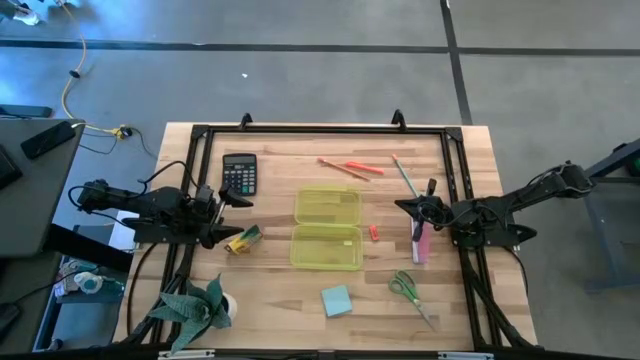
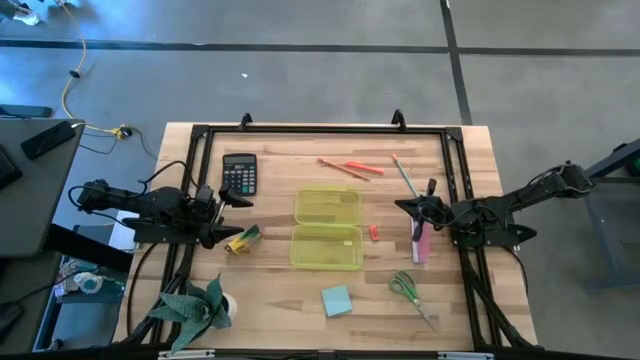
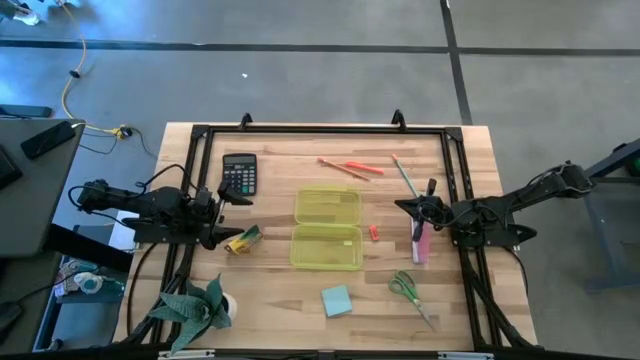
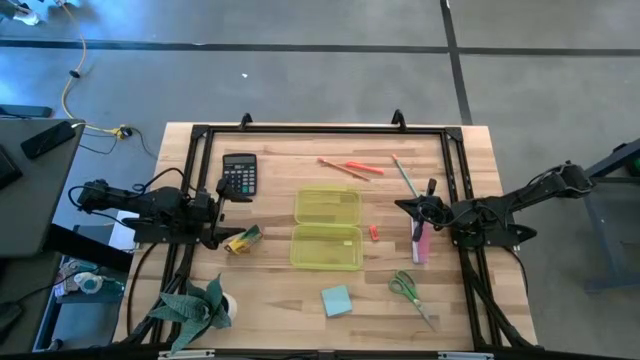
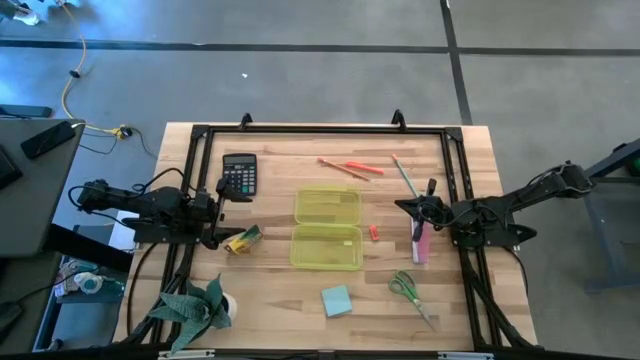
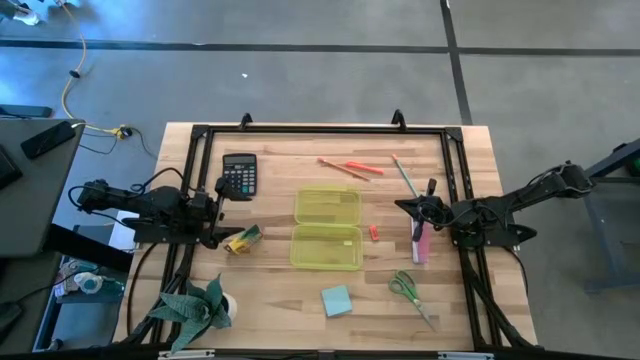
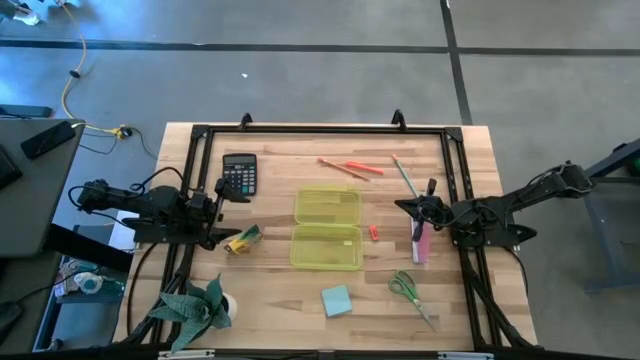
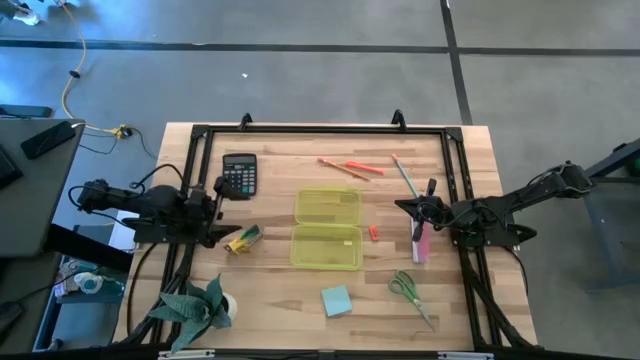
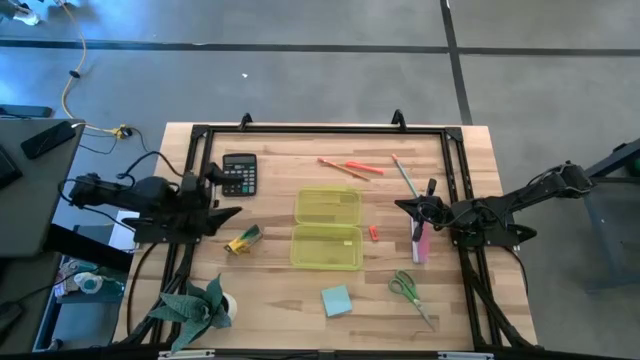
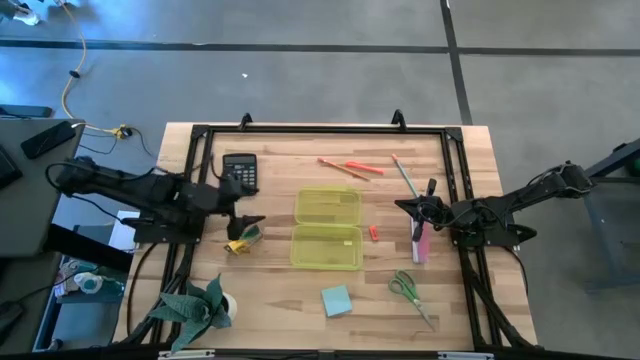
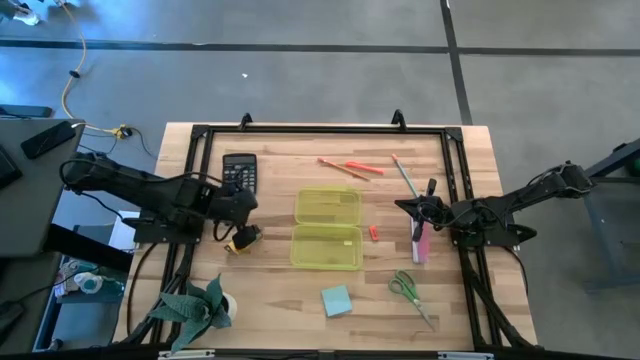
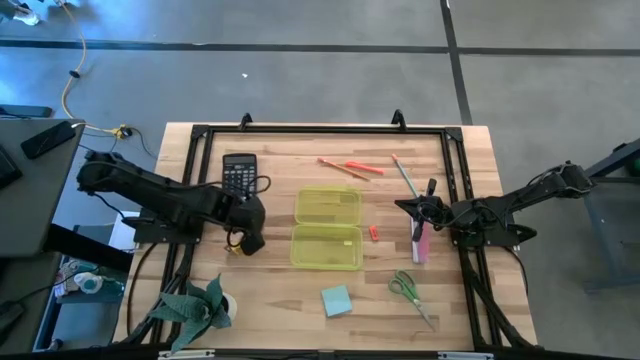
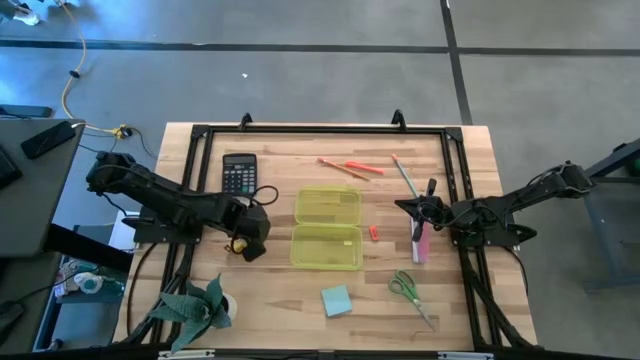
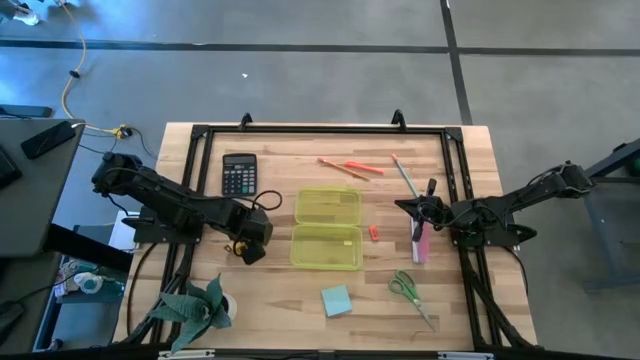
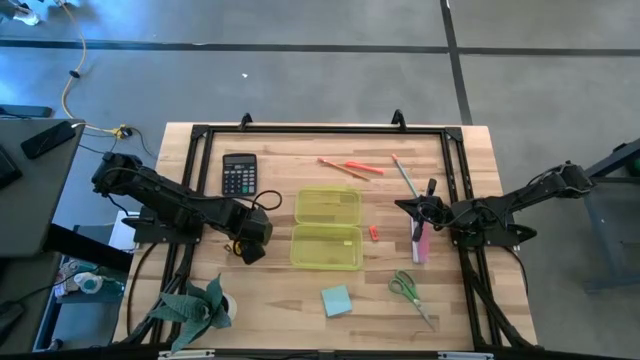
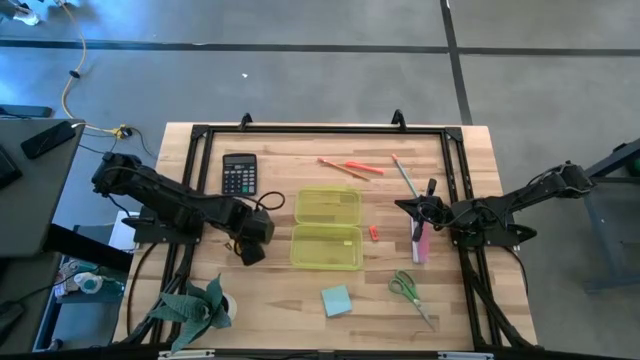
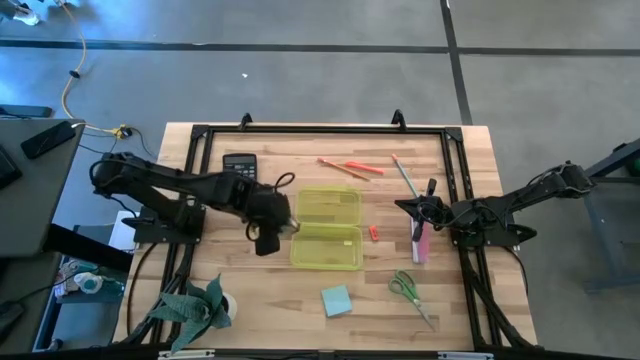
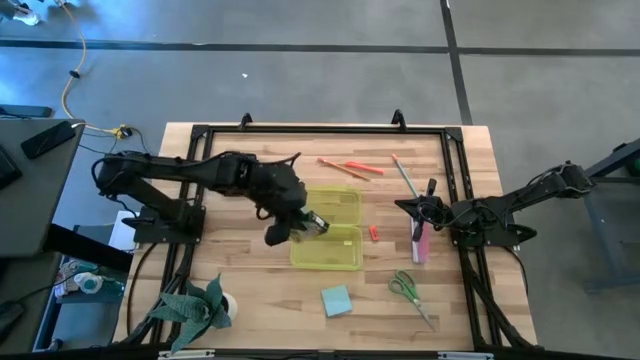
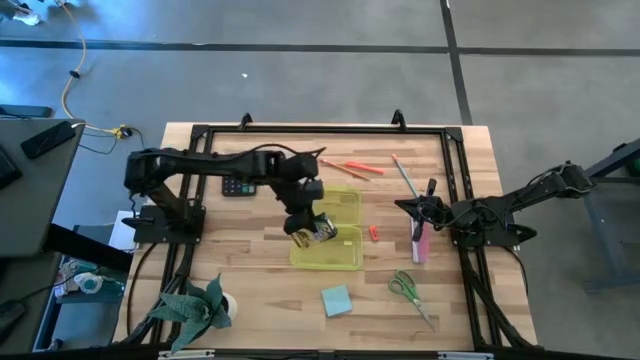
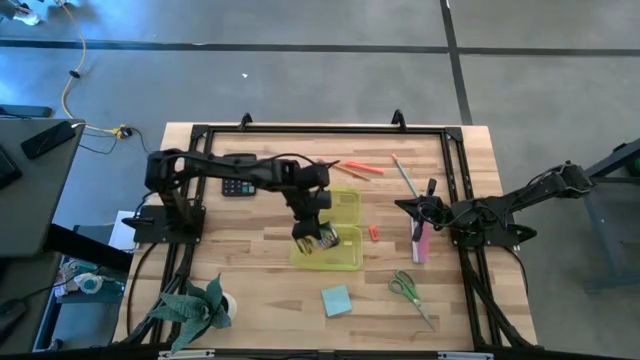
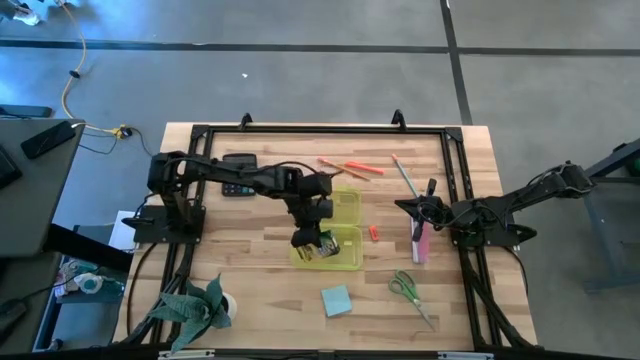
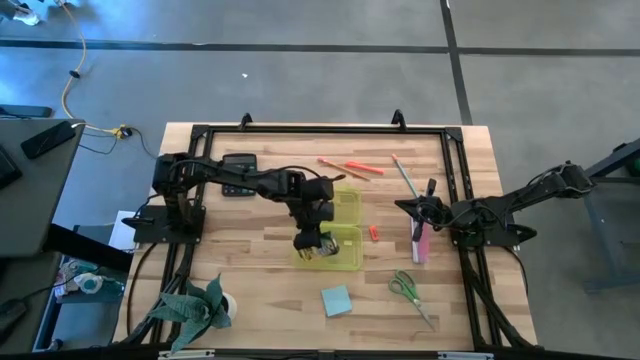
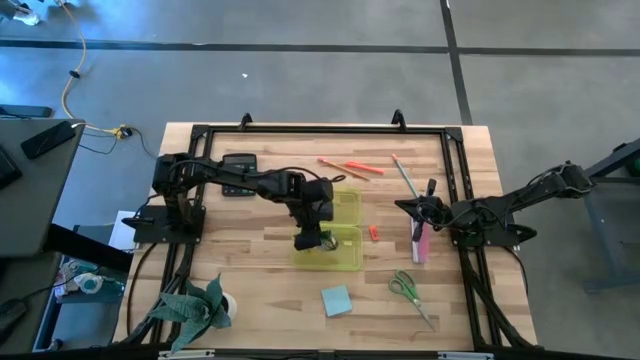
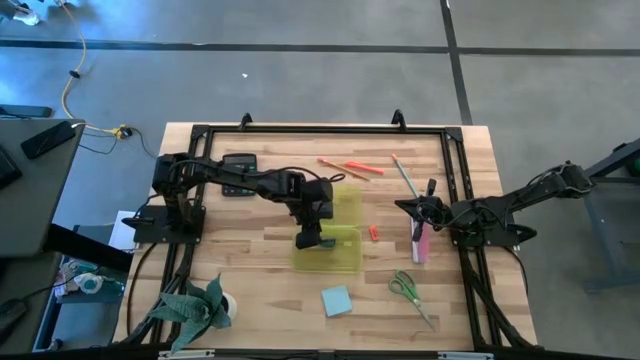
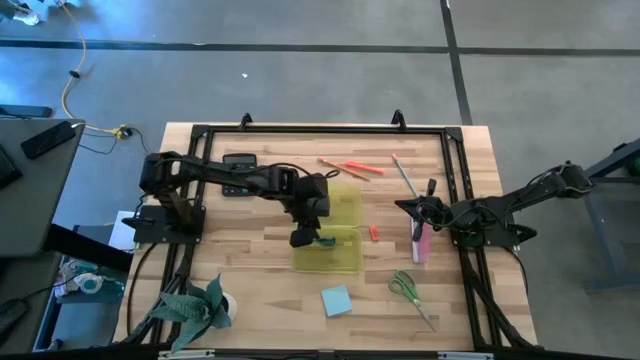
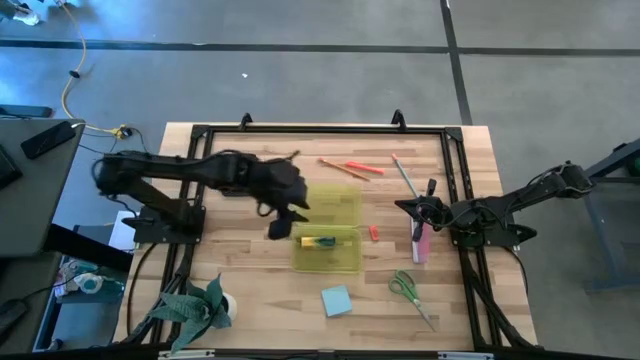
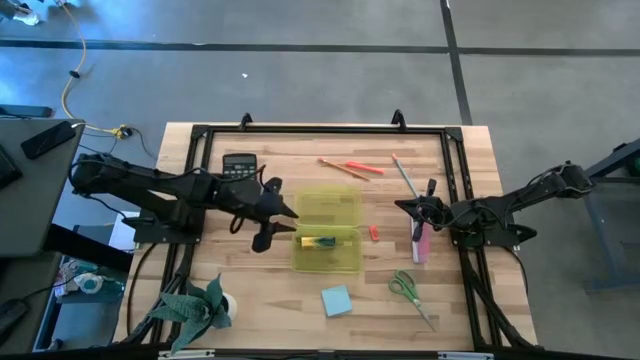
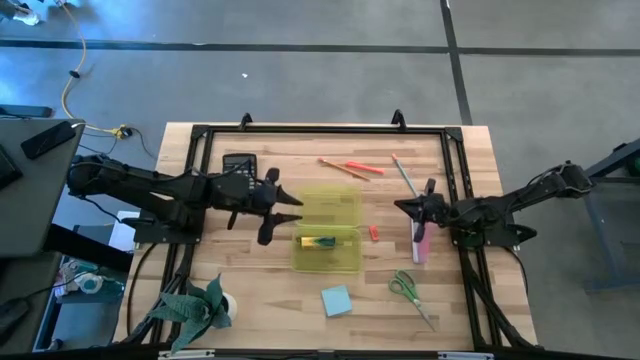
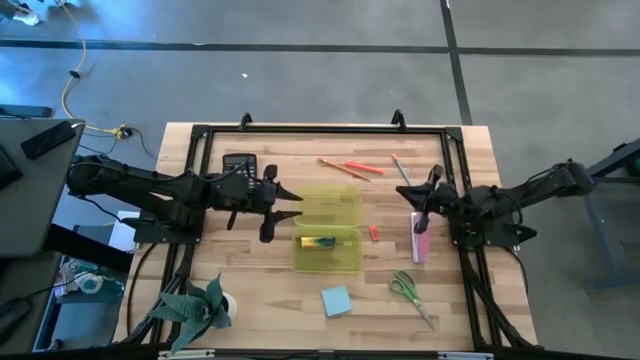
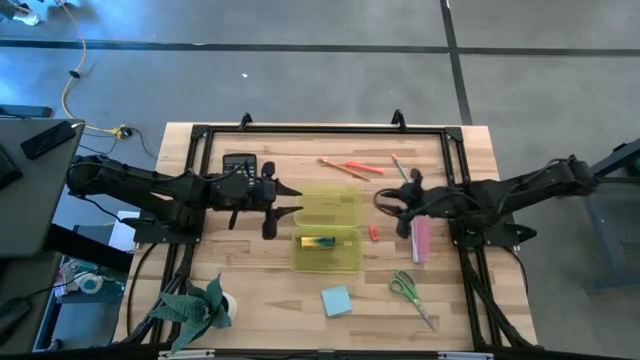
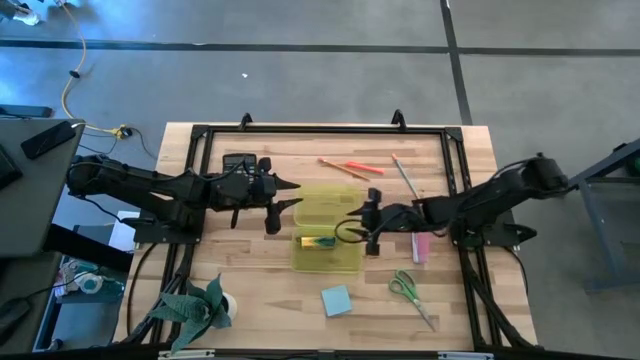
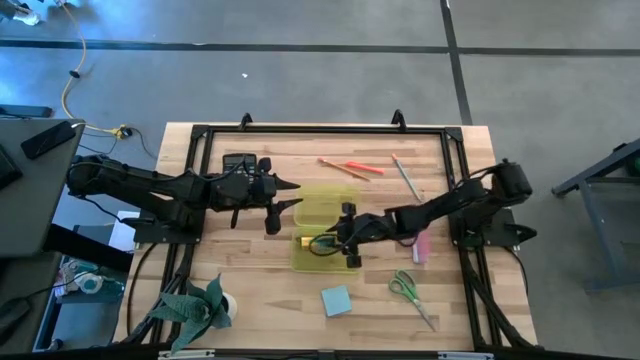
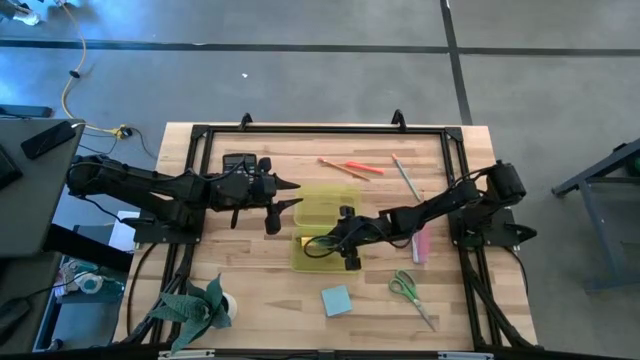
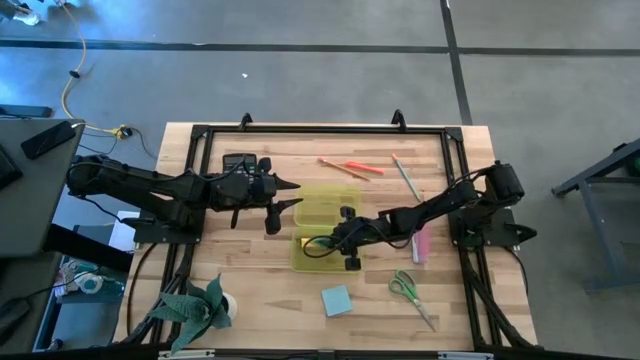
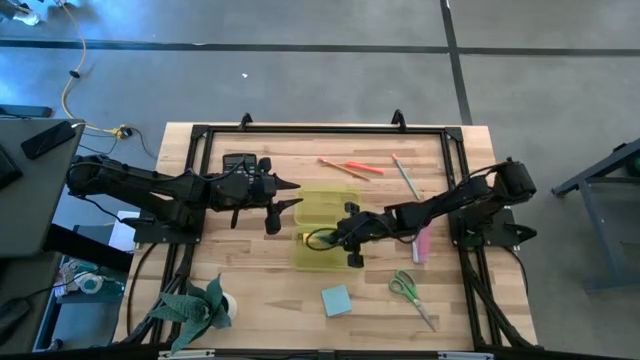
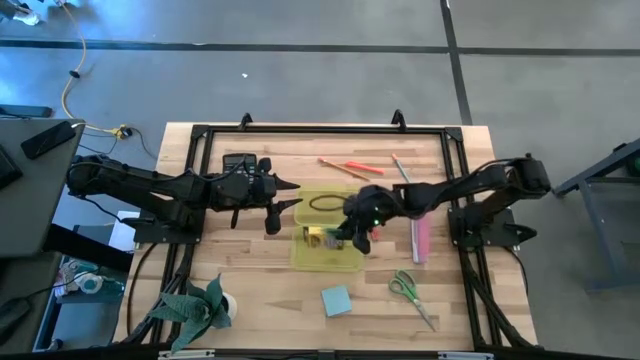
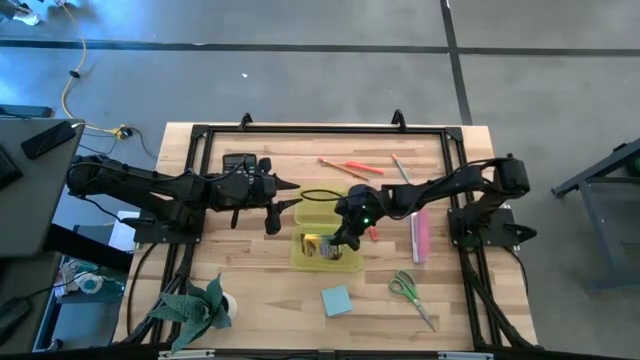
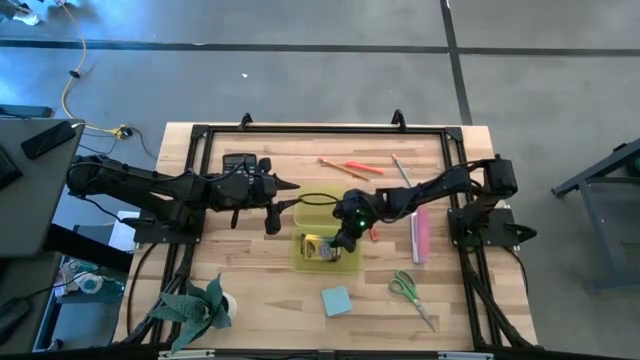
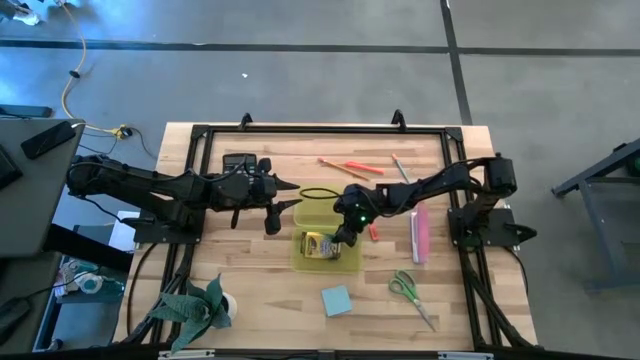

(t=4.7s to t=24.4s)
Task: Pack school essentials
Put the orange crayon box into the yellow supply box
